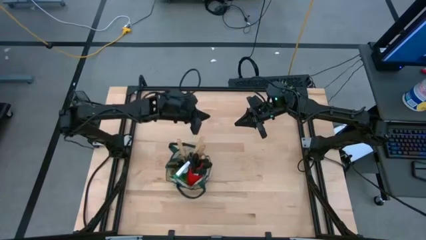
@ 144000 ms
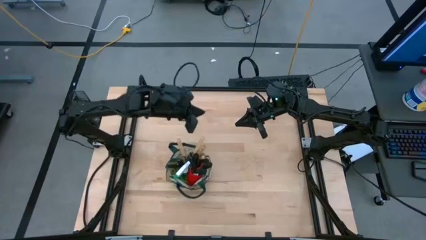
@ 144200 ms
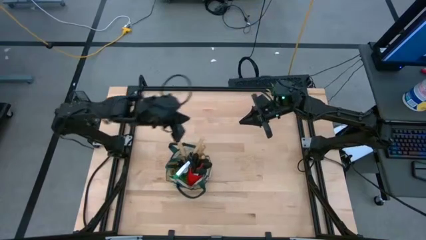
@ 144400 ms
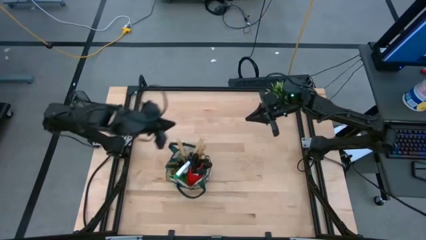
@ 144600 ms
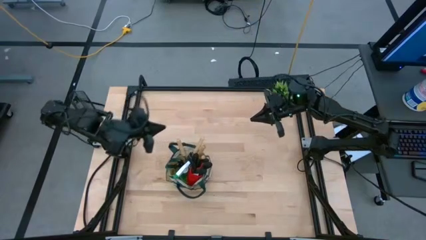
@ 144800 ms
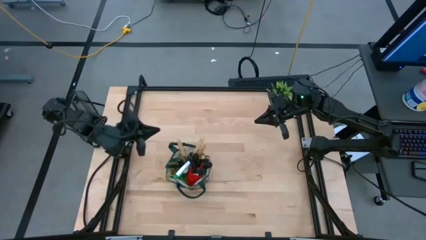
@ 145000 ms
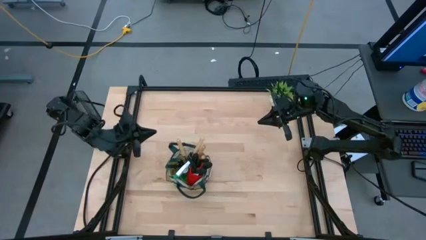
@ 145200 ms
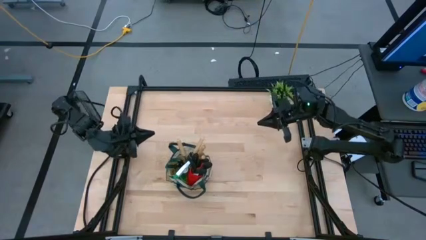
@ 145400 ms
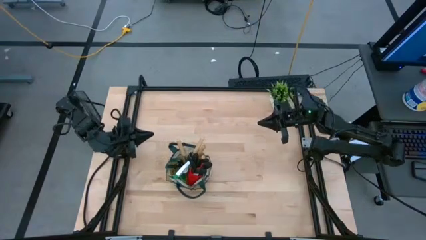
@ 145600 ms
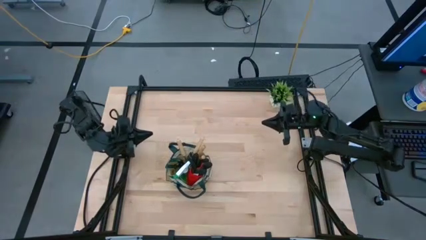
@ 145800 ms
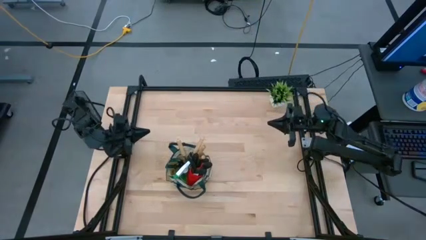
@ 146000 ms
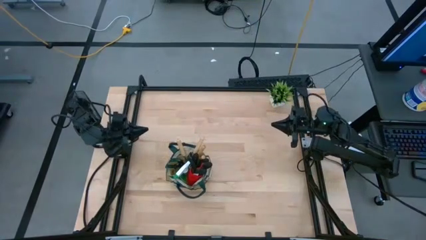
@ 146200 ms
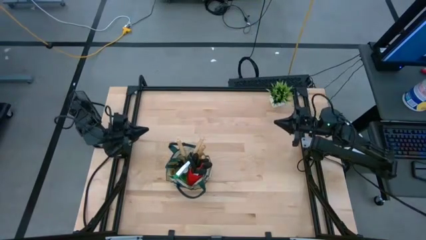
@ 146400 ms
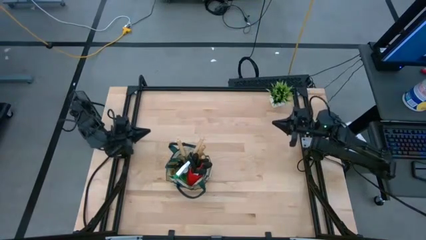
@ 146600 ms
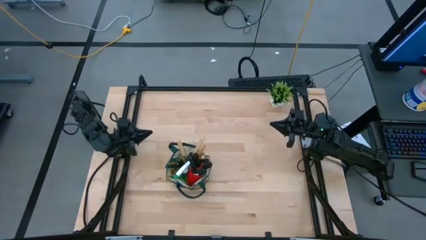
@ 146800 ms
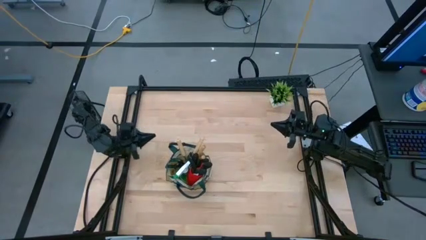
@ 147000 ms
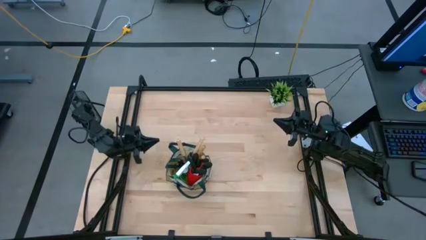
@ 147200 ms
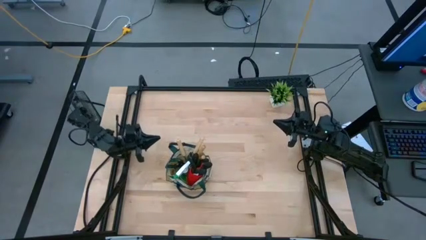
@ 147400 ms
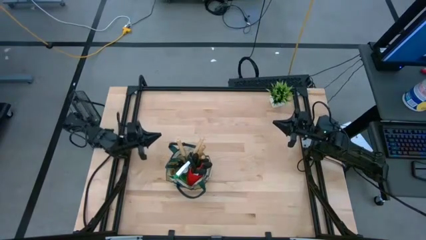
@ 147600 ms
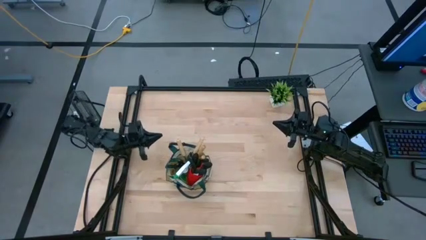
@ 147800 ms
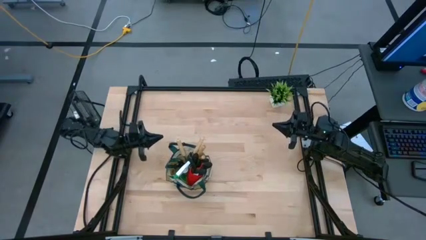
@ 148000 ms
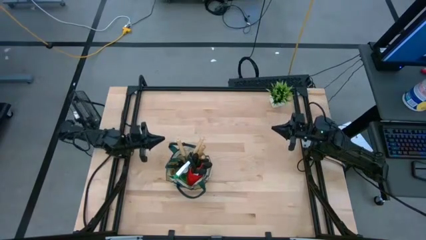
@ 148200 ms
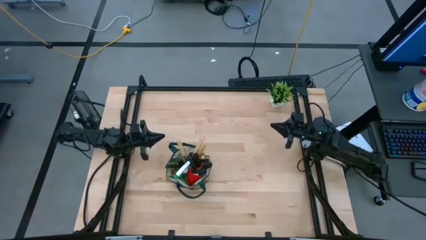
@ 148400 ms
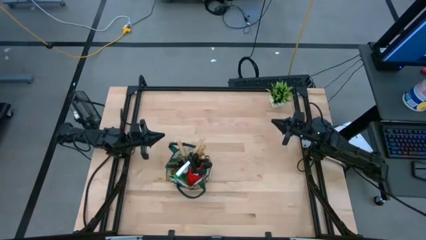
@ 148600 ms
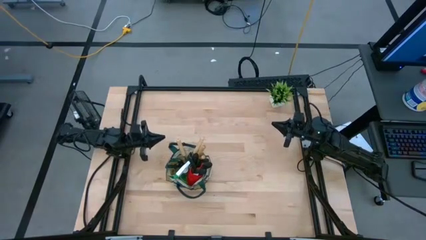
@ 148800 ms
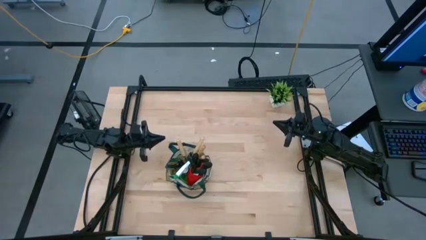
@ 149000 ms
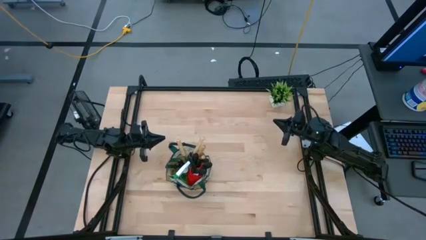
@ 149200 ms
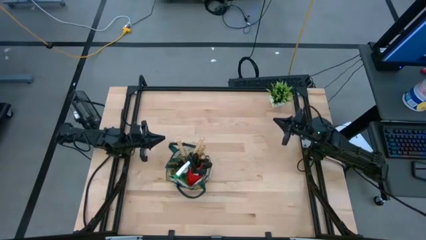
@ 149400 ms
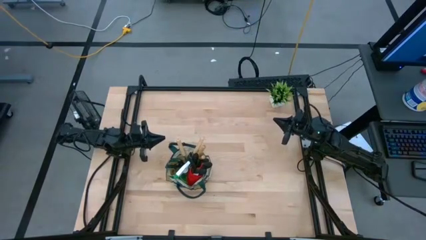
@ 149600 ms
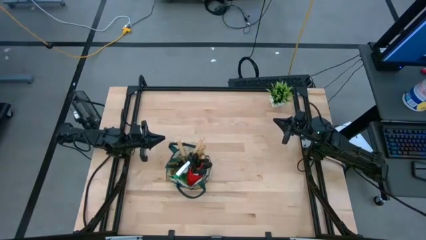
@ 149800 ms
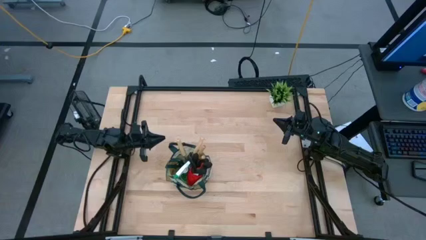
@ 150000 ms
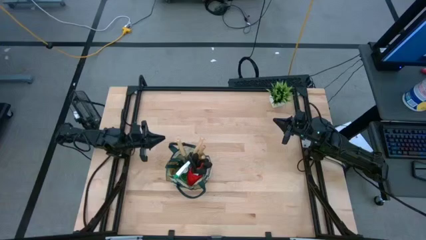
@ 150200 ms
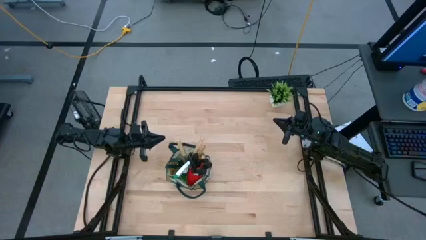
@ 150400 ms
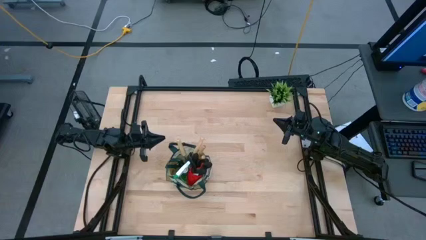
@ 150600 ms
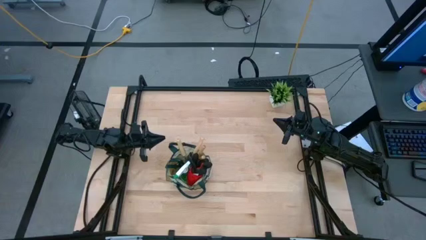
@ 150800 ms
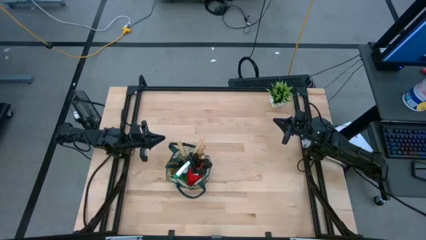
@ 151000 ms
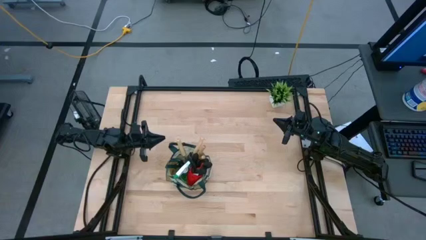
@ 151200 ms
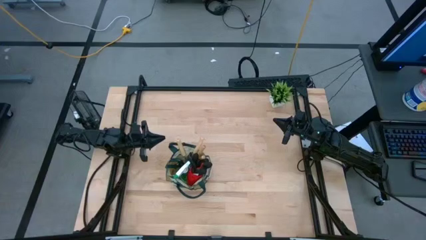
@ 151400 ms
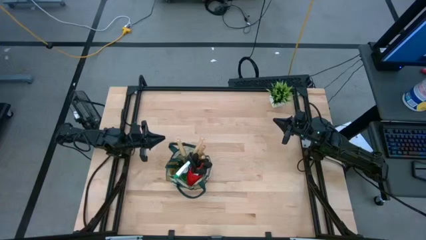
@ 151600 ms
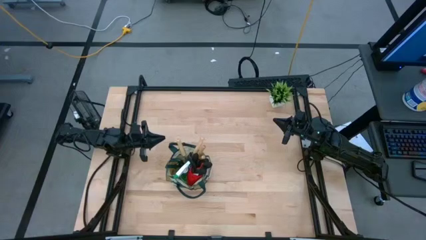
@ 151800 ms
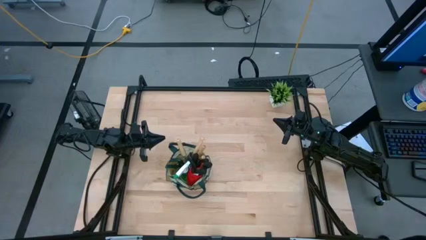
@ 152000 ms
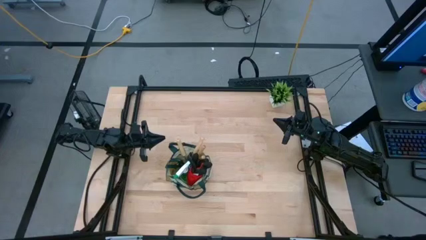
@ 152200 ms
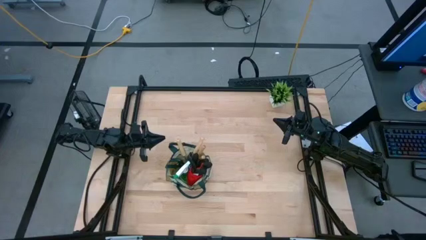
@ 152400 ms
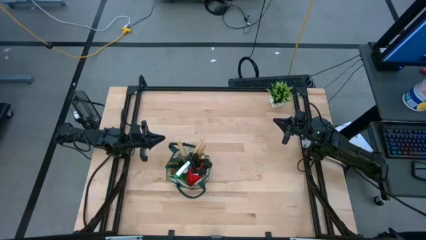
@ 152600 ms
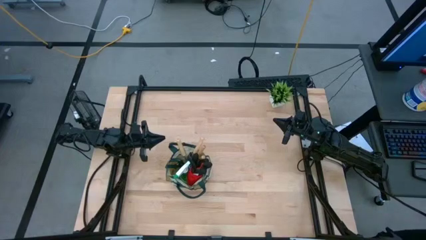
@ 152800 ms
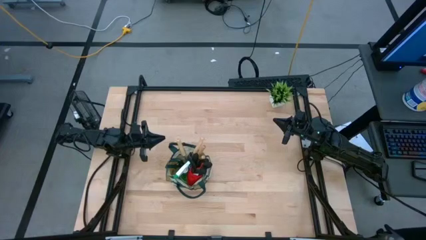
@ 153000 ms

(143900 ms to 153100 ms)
Task: Pick & Place Garden tools in Gardening bag
Return to Home Position
